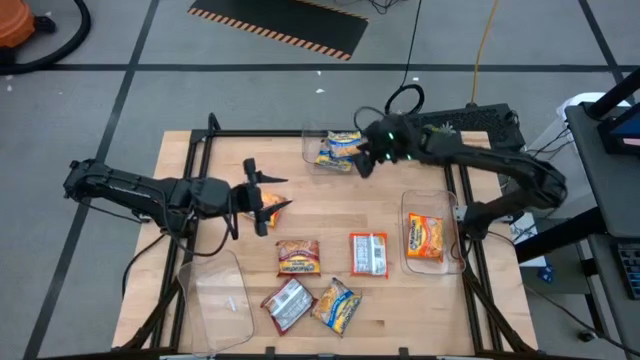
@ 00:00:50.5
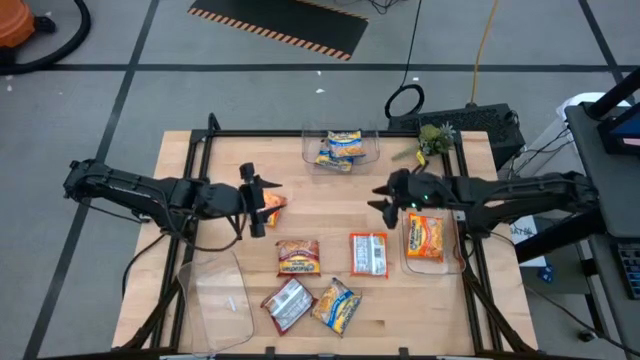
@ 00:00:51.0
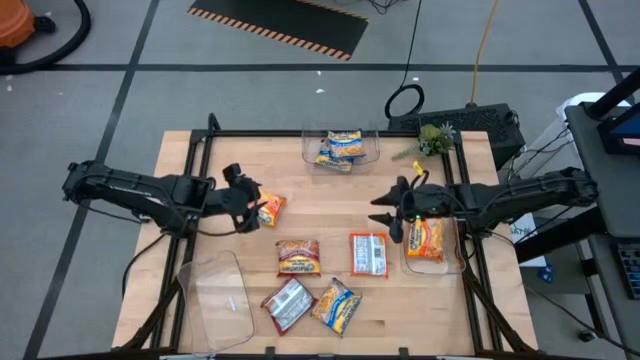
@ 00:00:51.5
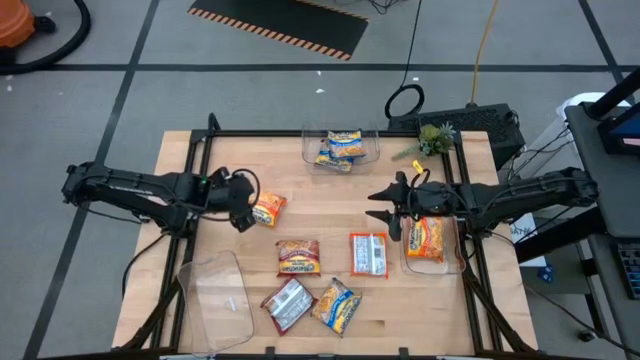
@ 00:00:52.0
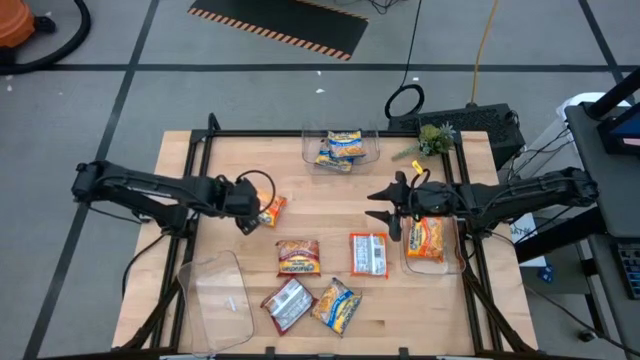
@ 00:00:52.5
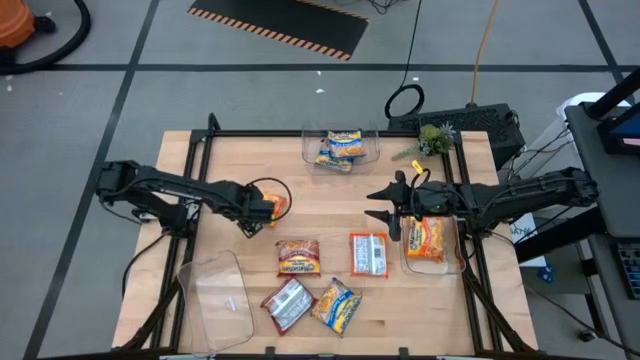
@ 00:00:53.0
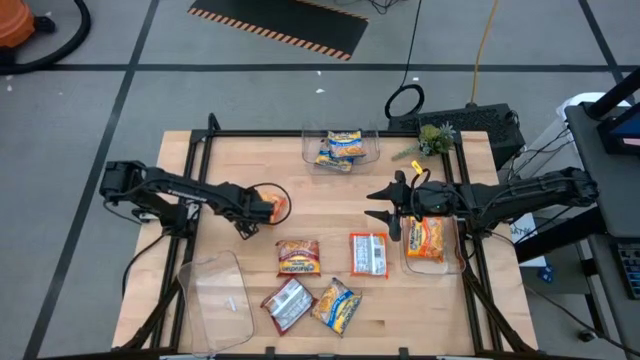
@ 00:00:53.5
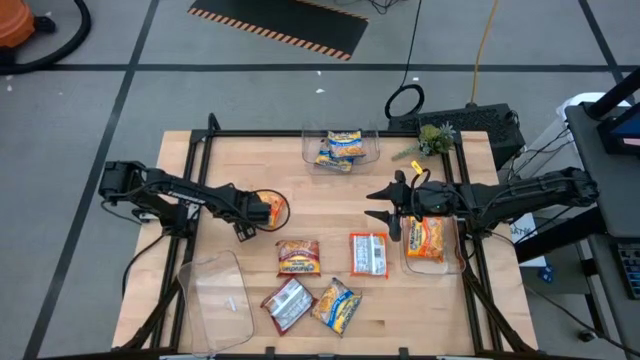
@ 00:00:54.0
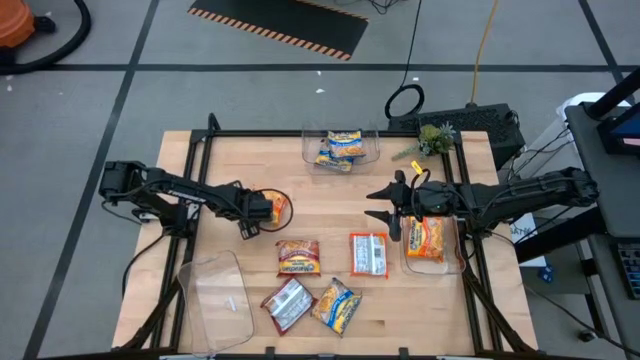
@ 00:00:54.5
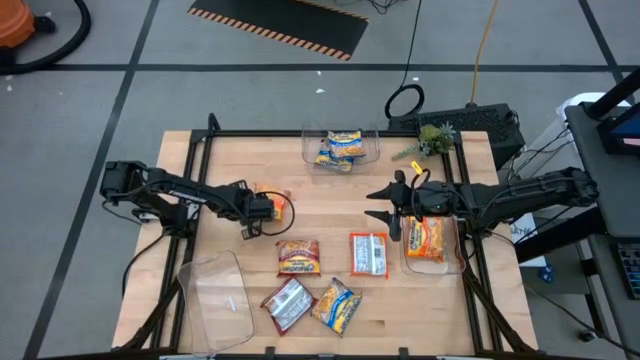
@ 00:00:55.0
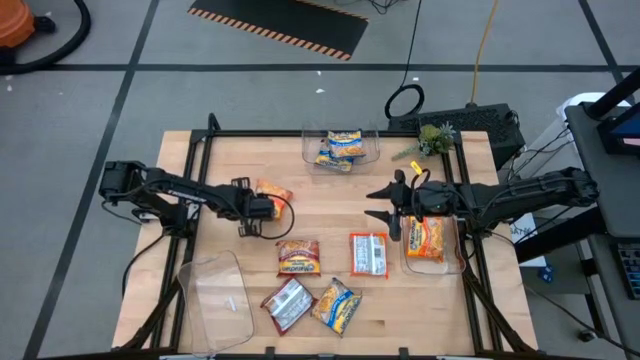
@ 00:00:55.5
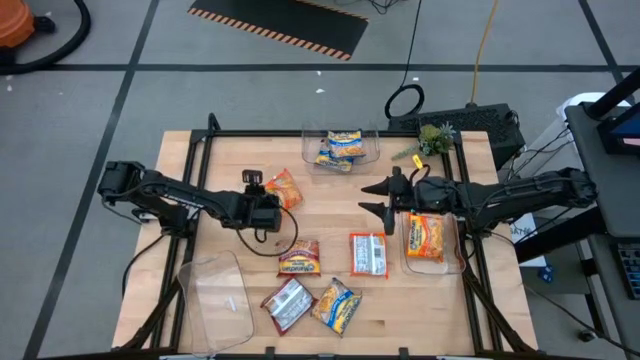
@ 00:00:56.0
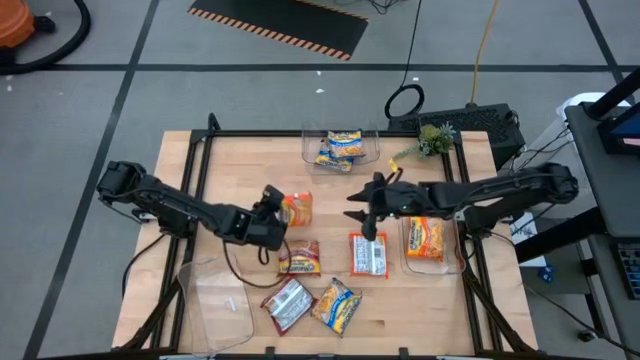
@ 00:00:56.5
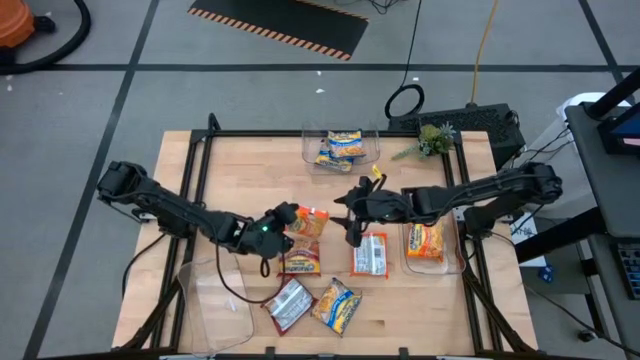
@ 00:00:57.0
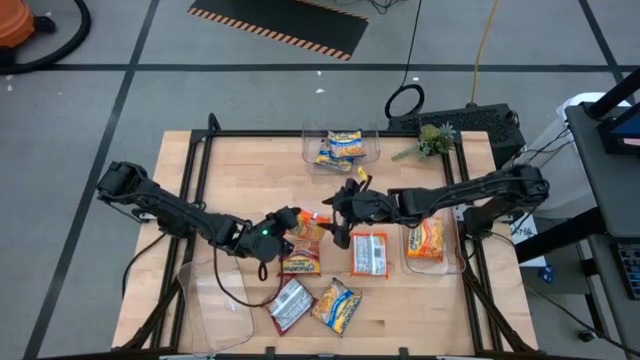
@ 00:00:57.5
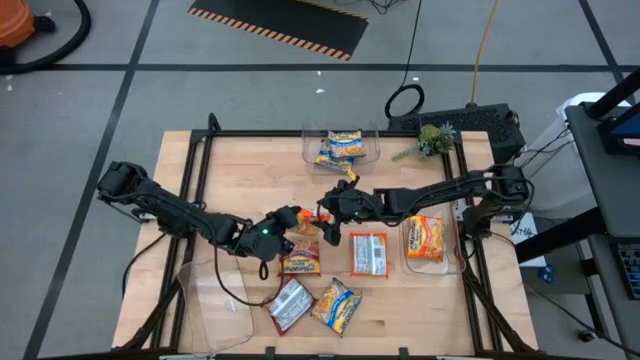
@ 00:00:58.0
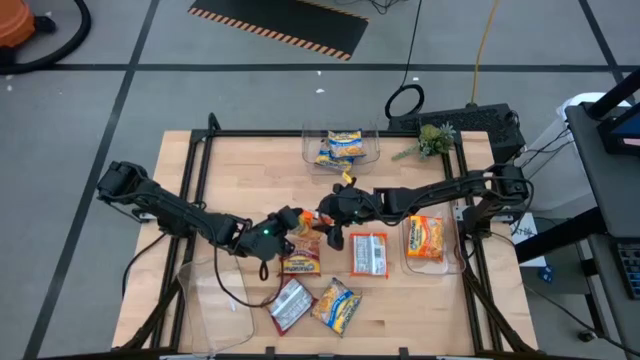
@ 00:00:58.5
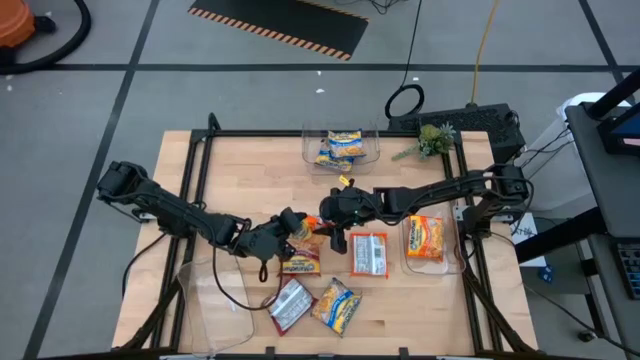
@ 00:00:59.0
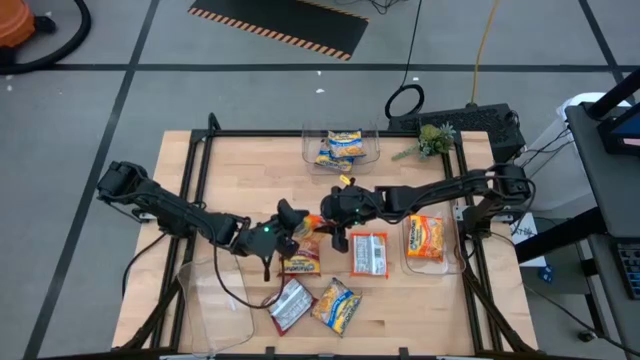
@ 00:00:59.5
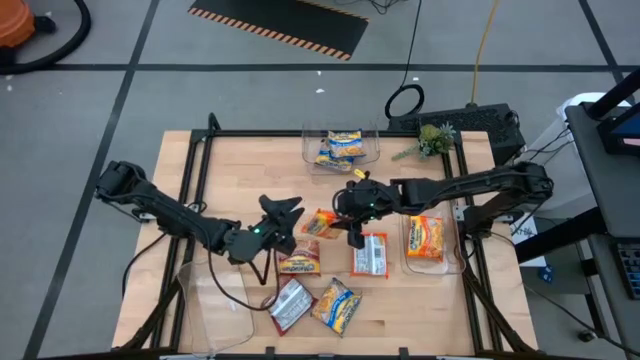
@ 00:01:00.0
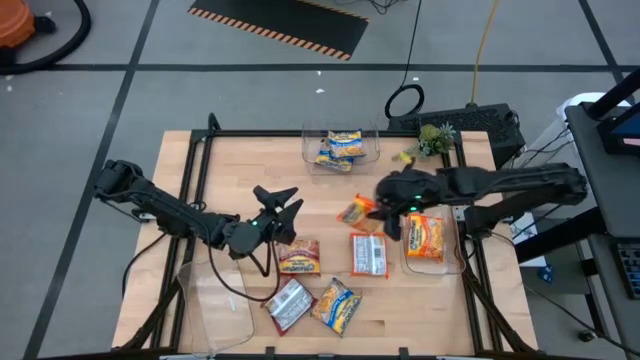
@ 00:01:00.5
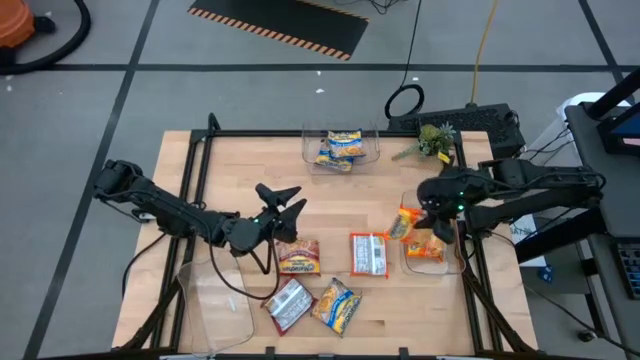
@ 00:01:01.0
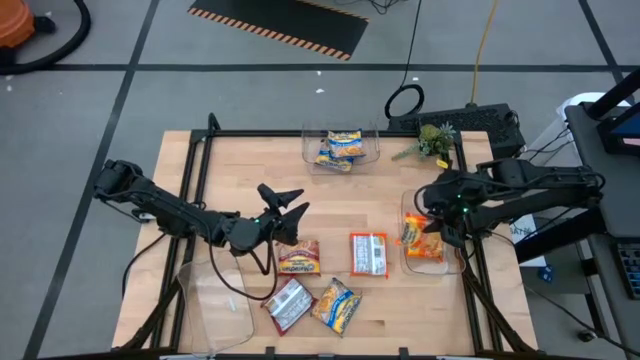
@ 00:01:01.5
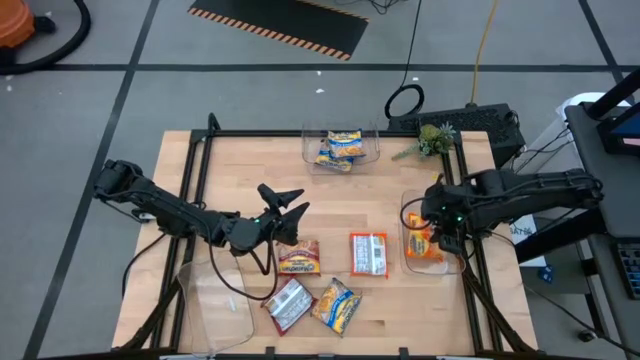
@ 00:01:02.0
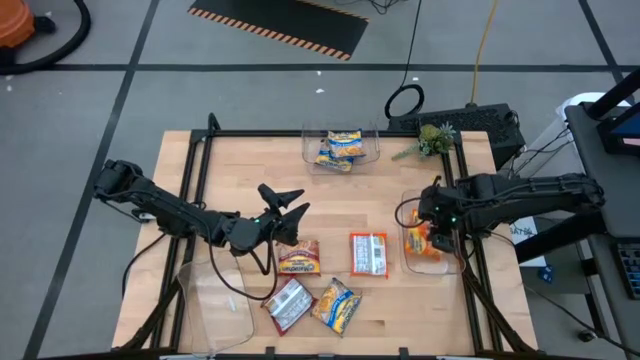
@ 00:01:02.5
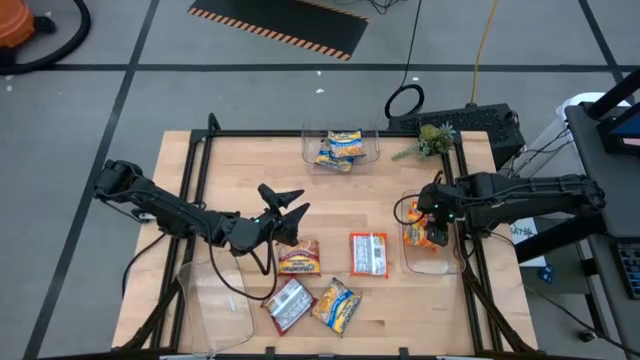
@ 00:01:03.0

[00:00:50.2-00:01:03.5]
Task: Sort Maruchan noodles
Put the left orange noodle pack into the right transparent bin

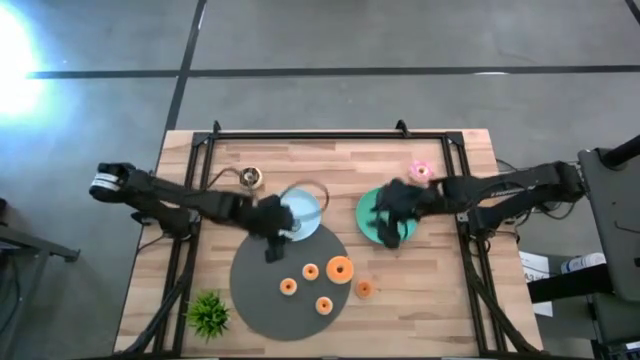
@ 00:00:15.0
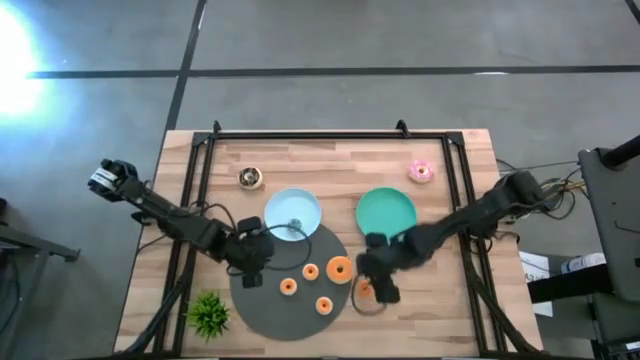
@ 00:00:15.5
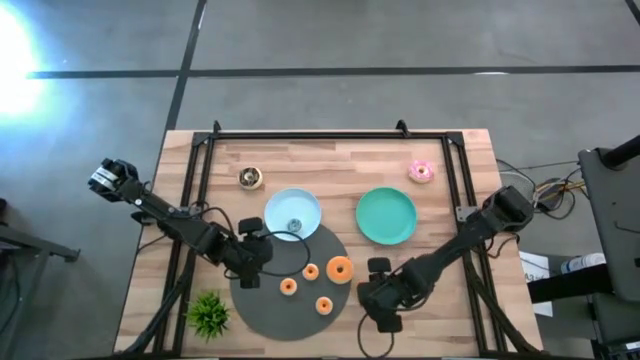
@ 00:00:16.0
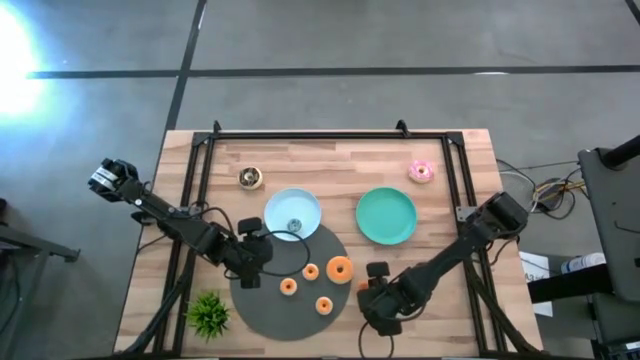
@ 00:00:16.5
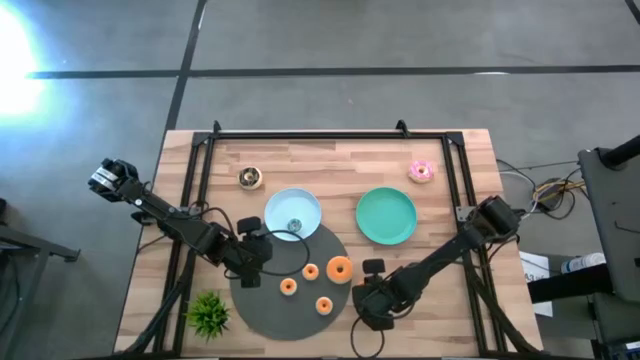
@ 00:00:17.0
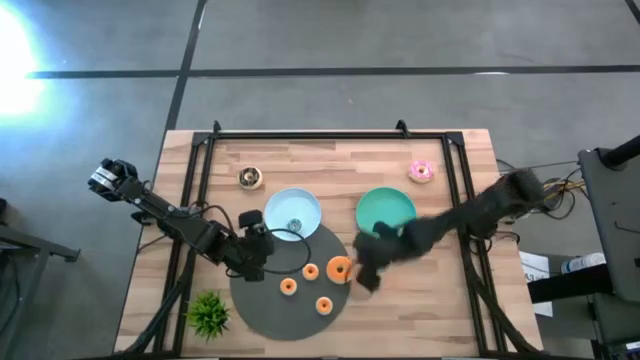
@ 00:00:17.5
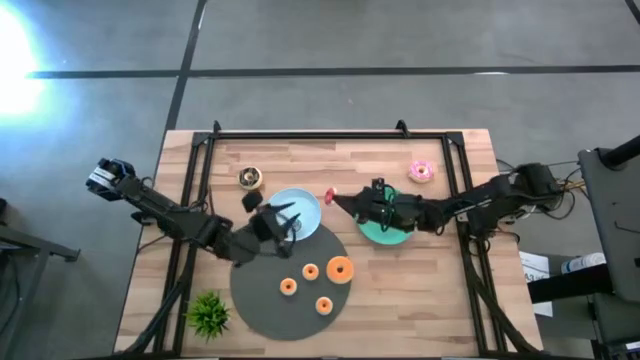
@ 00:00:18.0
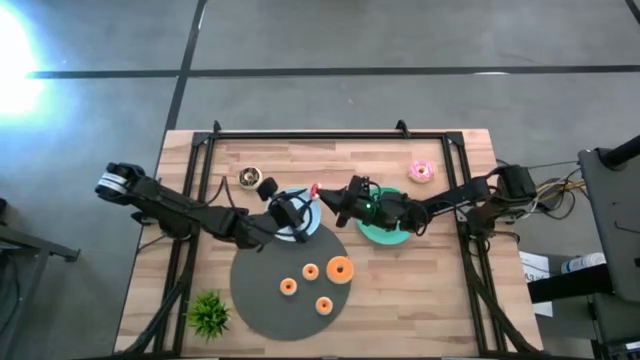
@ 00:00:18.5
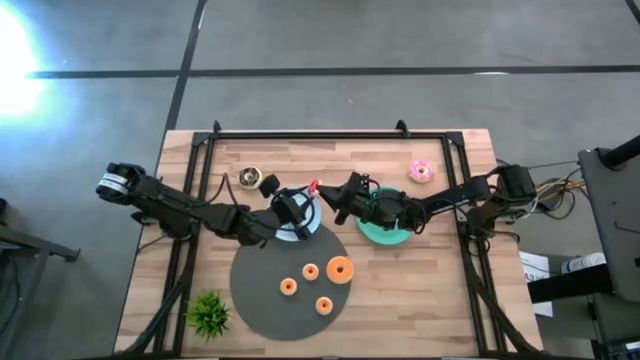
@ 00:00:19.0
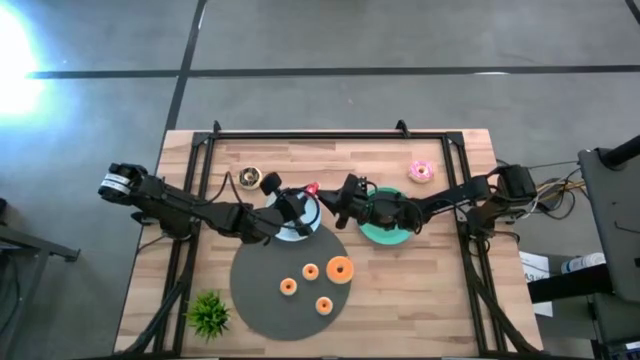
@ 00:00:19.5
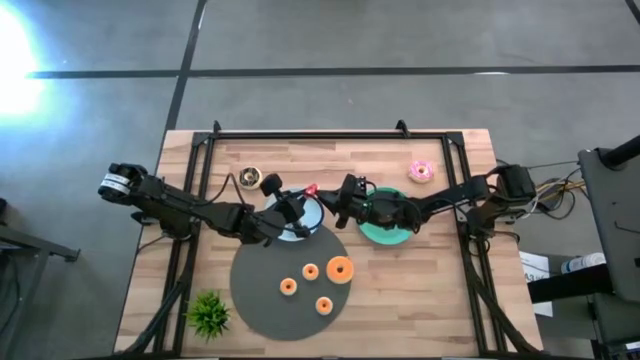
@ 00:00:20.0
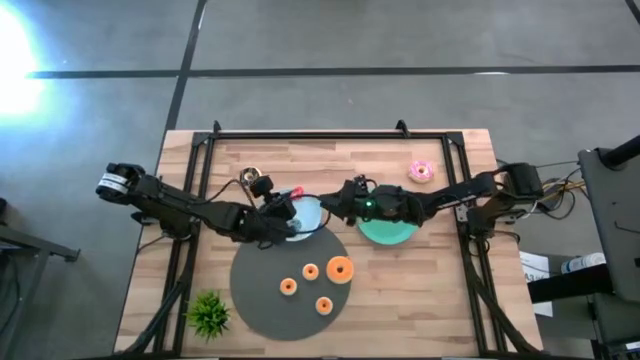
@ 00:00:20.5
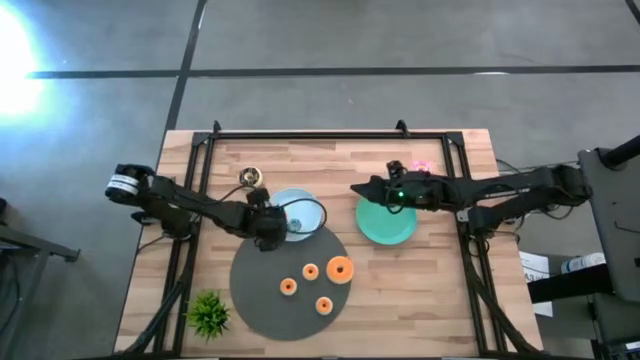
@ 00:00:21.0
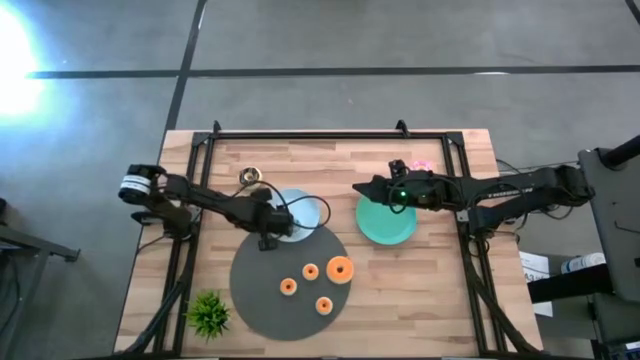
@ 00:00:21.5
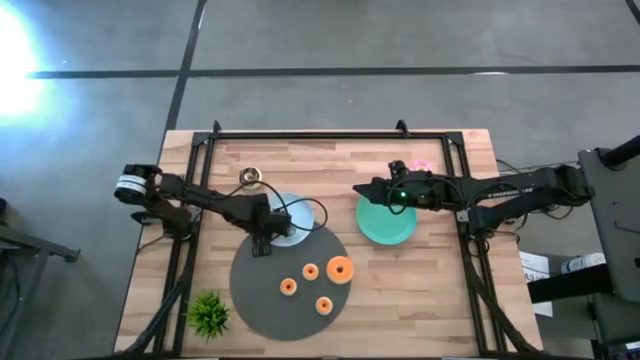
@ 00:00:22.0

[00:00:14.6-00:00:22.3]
Task: Pick & Place donuts
Put the small orange donut on the white plate
